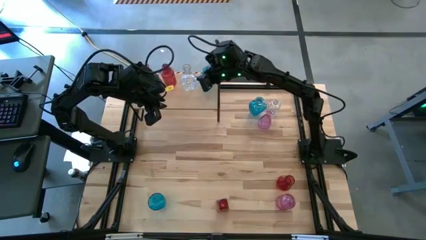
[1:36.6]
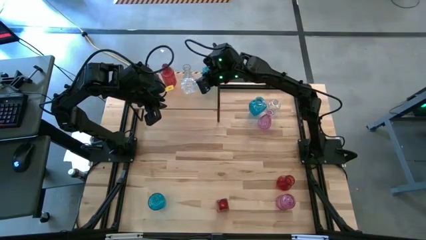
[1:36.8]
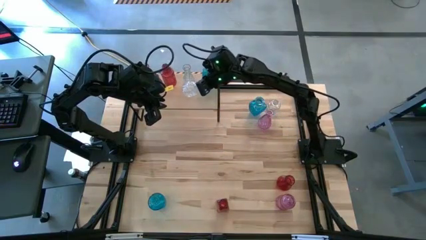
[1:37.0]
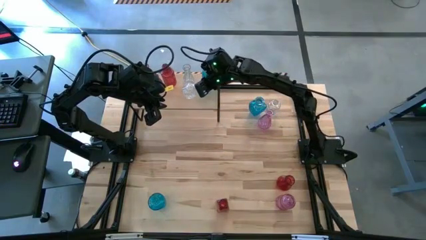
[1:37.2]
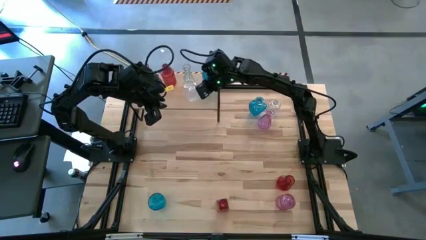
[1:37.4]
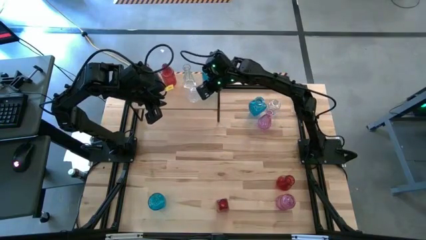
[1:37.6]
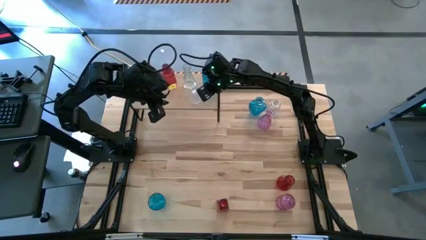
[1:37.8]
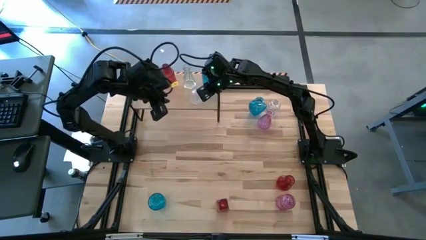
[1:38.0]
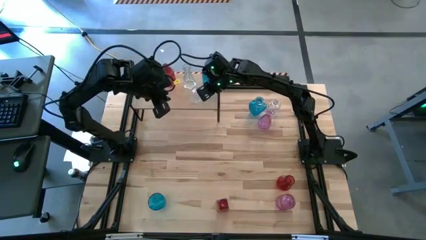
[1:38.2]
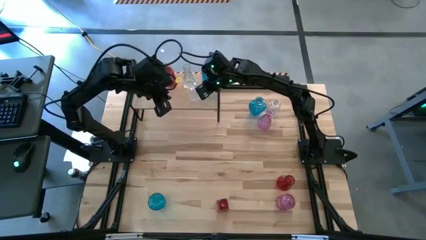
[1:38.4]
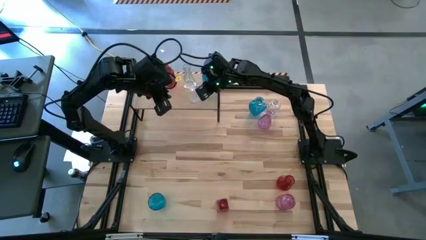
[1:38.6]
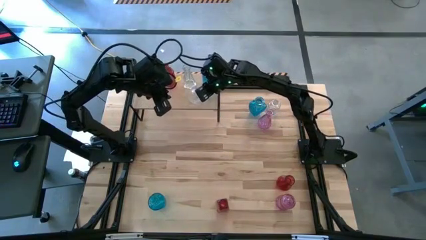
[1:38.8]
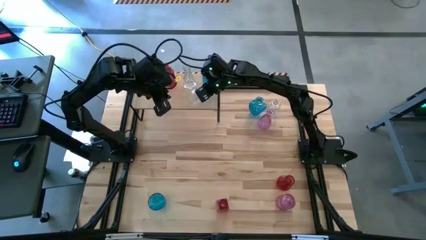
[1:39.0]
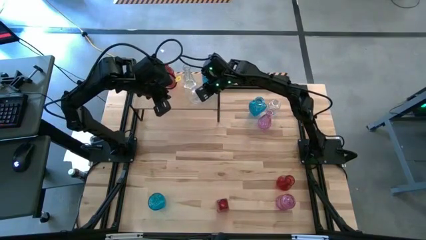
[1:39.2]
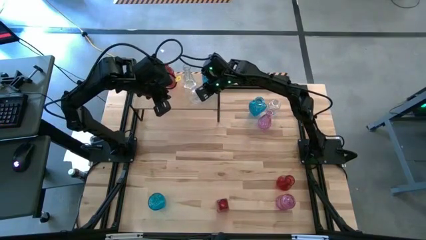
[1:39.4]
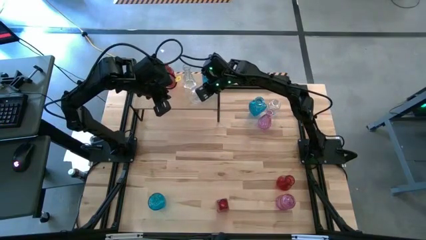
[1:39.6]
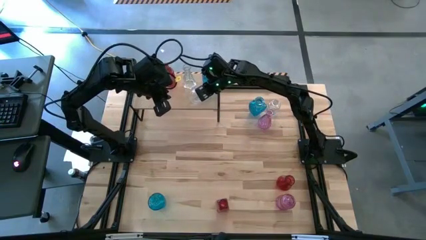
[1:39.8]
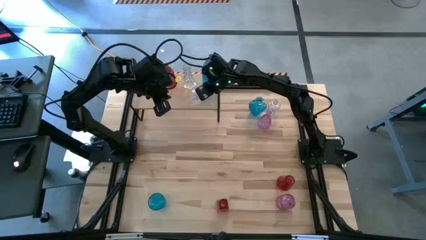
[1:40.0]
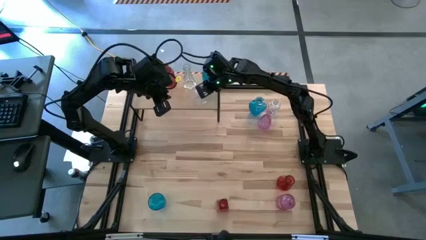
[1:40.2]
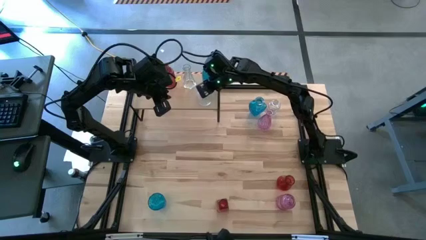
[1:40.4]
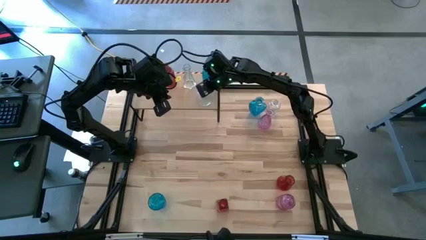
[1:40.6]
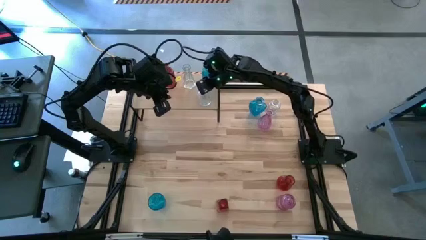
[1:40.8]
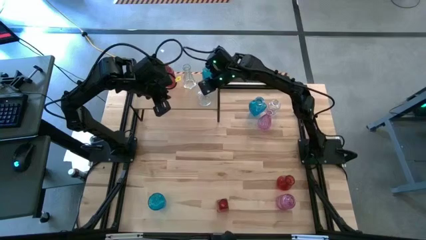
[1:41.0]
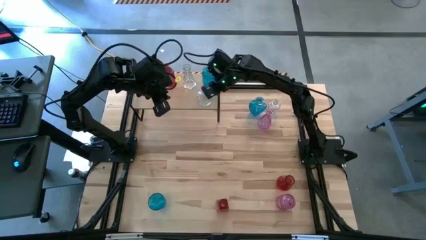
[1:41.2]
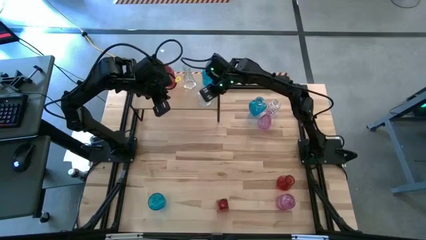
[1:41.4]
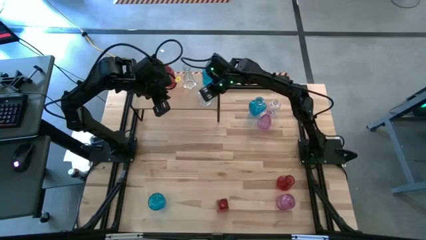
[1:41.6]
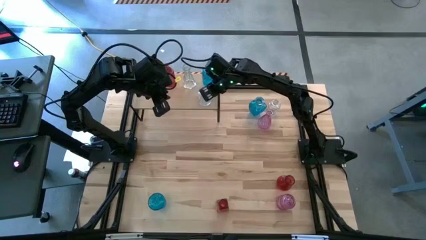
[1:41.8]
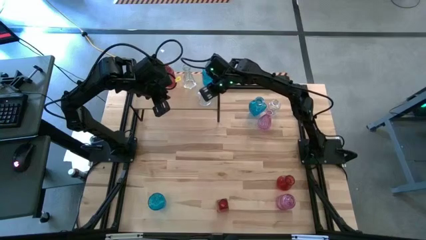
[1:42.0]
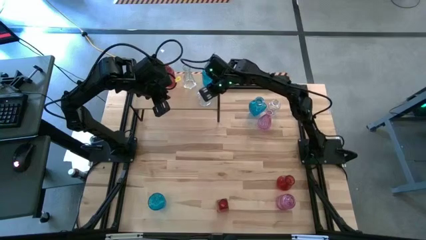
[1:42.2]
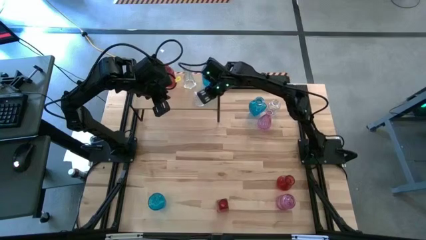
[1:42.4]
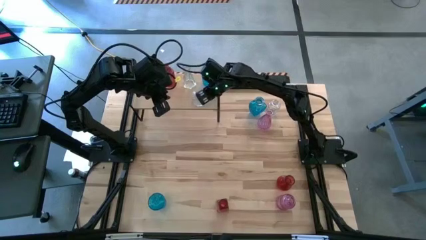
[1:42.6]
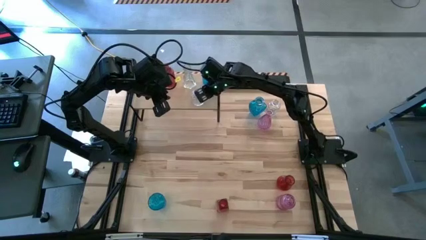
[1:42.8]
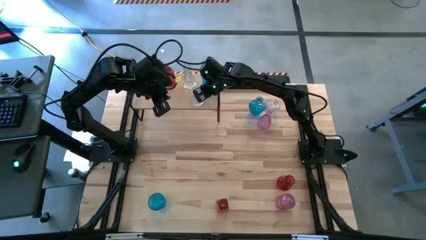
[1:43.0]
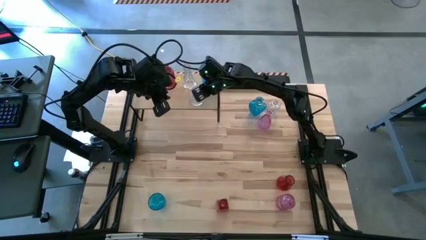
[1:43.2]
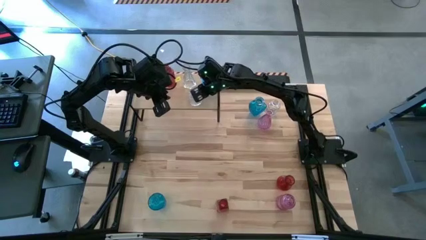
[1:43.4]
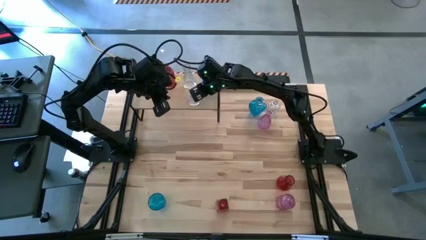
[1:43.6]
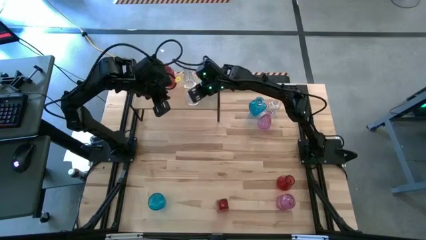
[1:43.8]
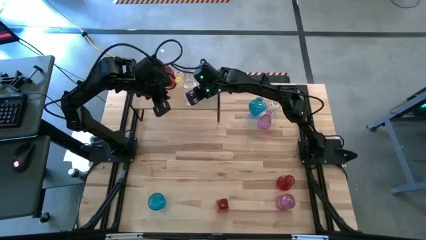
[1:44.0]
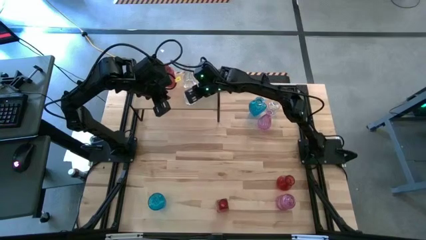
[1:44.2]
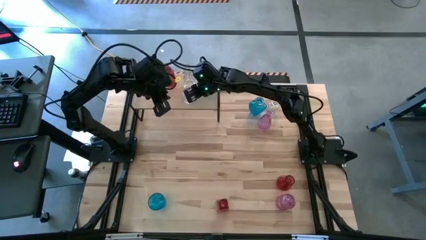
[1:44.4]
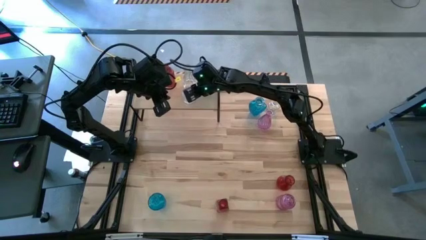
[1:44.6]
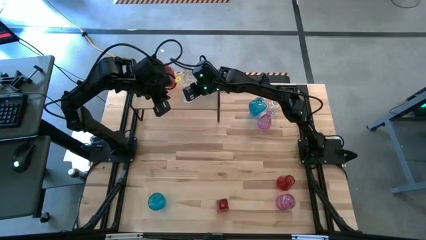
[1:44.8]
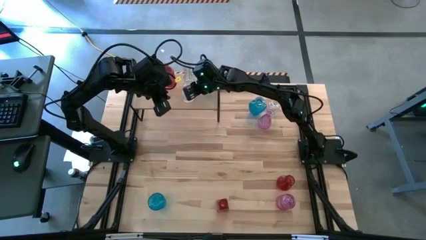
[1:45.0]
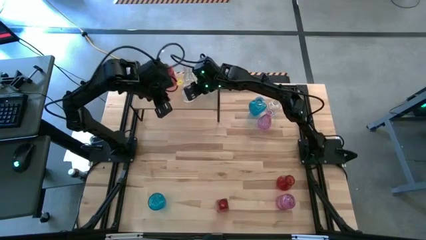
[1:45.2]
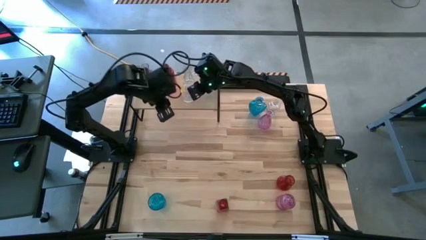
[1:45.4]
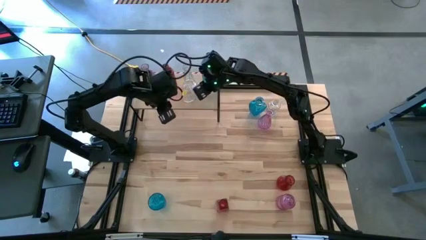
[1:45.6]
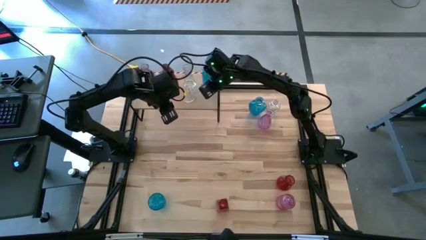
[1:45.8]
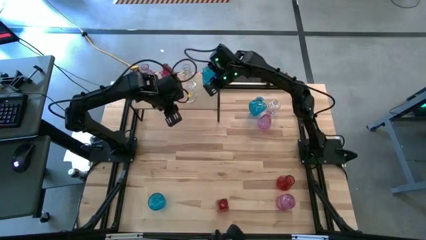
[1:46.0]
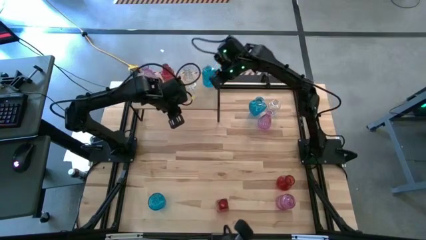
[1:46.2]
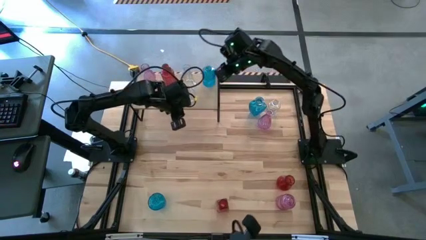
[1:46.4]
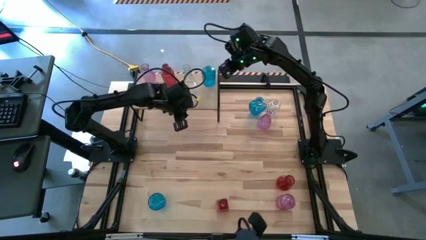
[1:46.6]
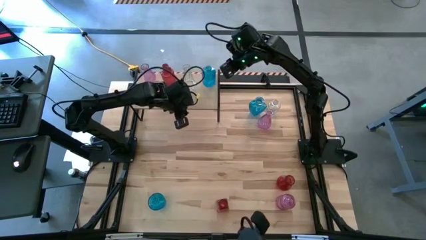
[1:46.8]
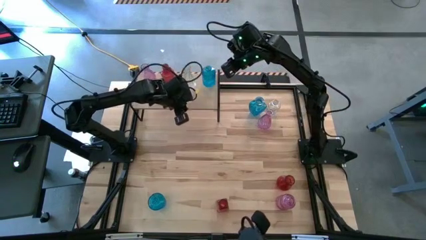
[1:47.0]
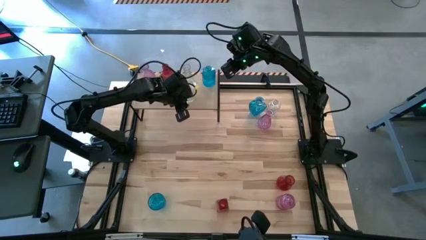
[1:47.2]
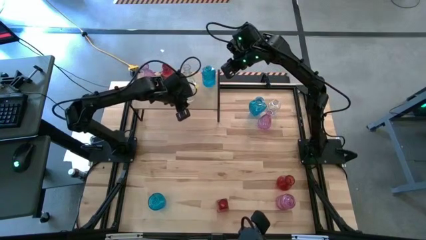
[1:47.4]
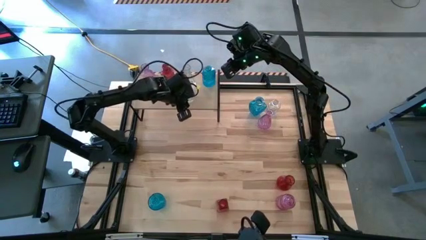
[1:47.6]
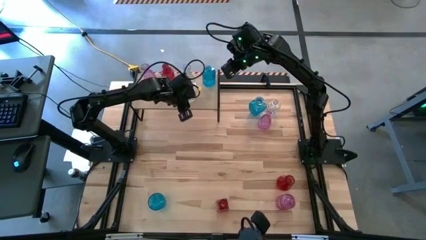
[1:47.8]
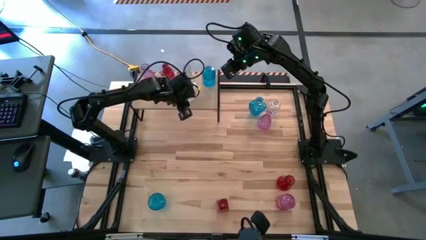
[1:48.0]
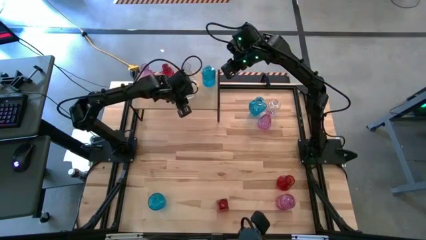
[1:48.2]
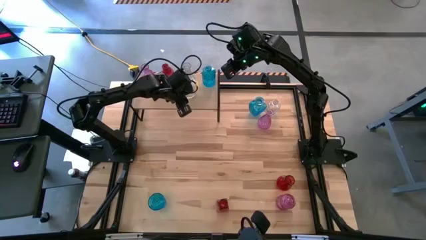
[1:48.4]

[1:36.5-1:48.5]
Task: sort vases onto shelf
Put the bottom transparent vase on the shelf aligned with the other transparent vase

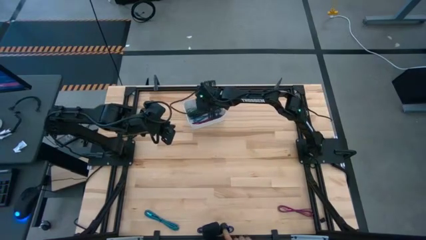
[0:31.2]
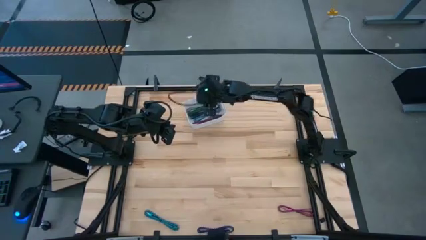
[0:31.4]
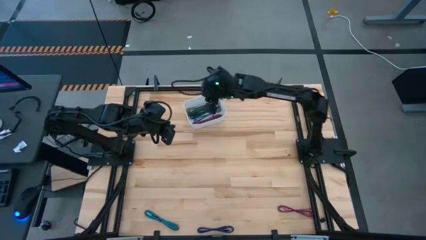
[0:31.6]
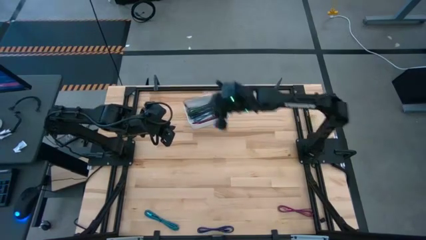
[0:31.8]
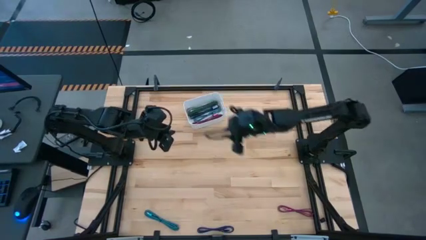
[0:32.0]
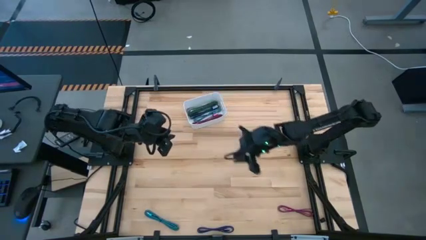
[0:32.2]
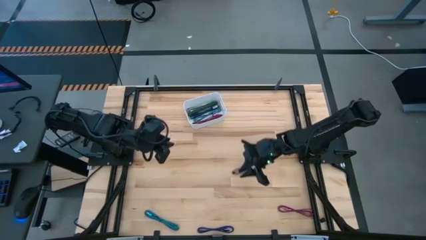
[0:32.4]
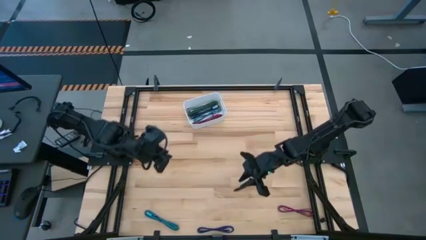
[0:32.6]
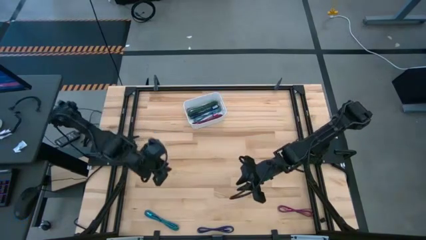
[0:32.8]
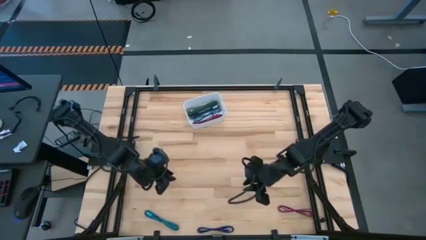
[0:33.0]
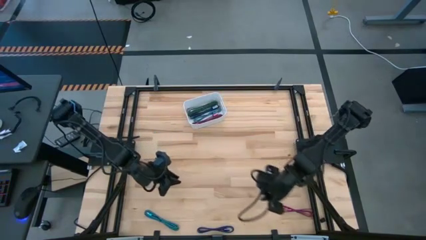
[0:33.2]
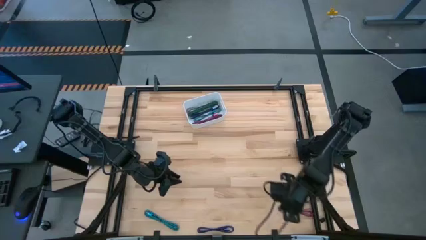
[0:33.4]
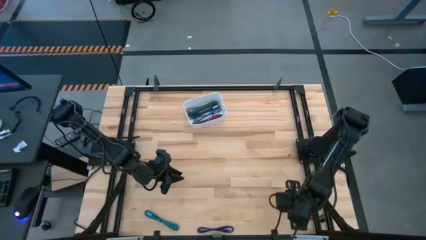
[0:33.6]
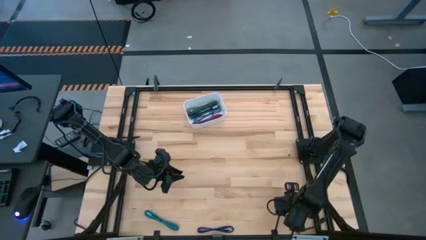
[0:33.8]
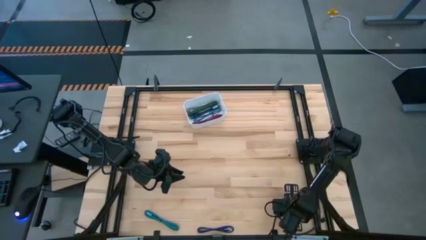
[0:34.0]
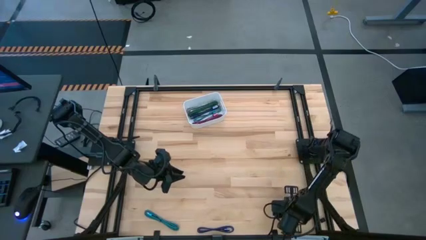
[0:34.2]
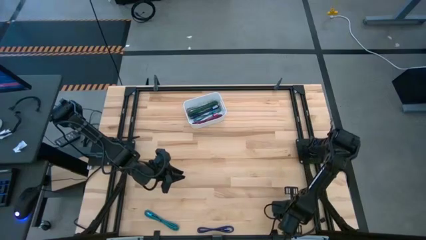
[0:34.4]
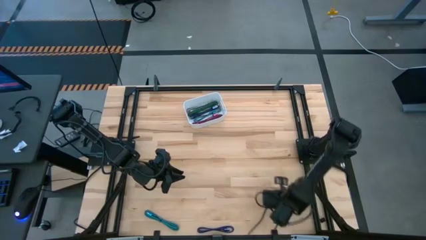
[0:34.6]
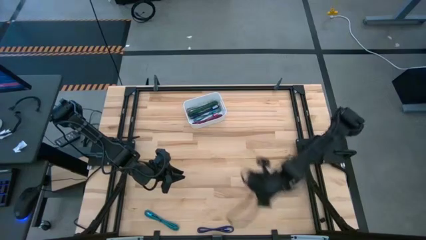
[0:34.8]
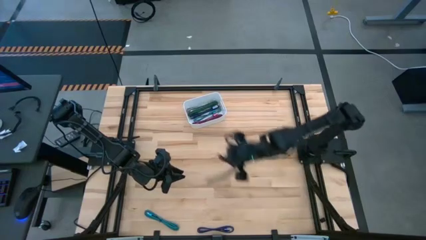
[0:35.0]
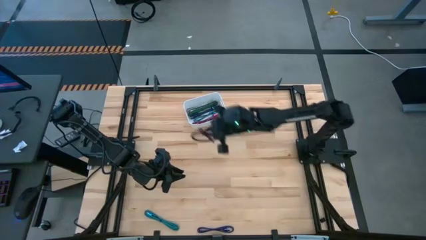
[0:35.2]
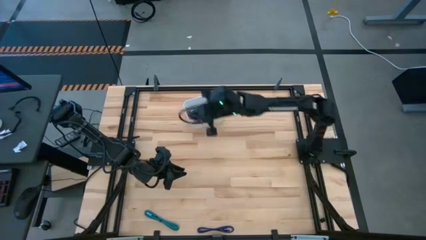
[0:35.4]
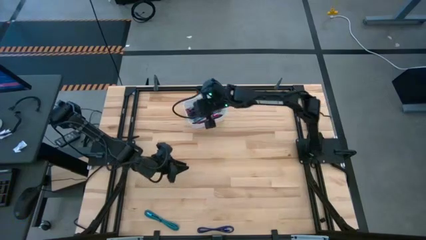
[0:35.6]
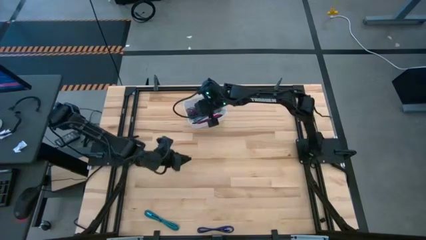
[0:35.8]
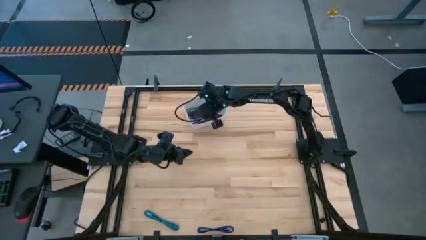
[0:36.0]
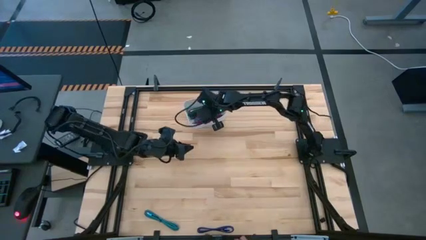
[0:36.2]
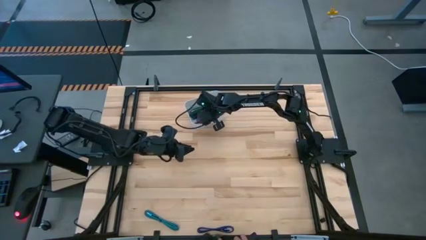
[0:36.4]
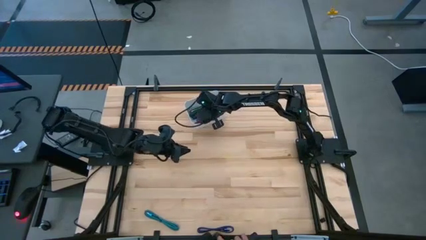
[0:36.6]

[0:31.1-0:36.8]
Task: Pick and place USB-C Cables
Put the black pink charger cable into the white bin
